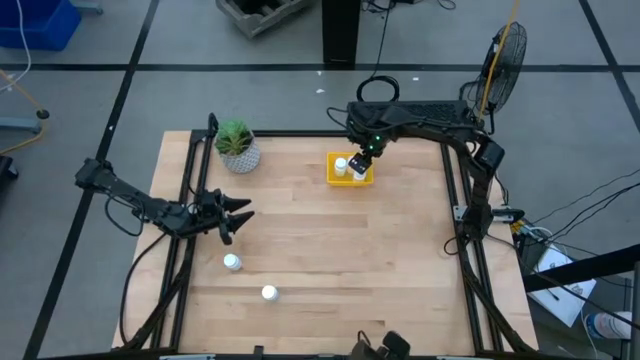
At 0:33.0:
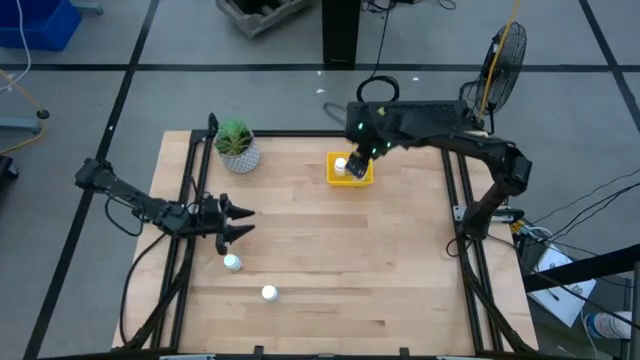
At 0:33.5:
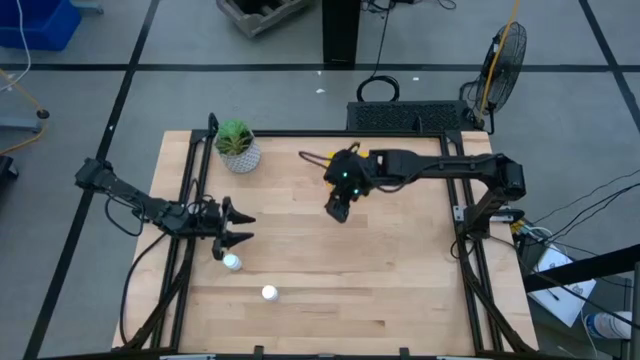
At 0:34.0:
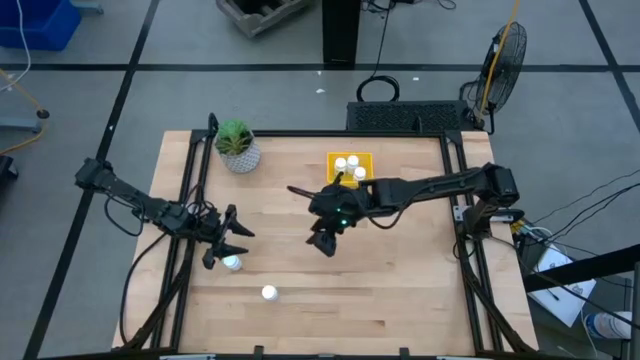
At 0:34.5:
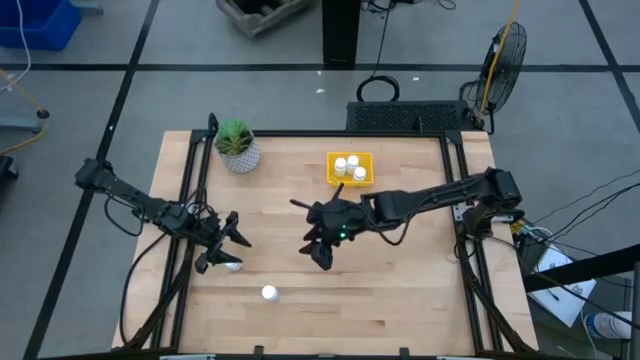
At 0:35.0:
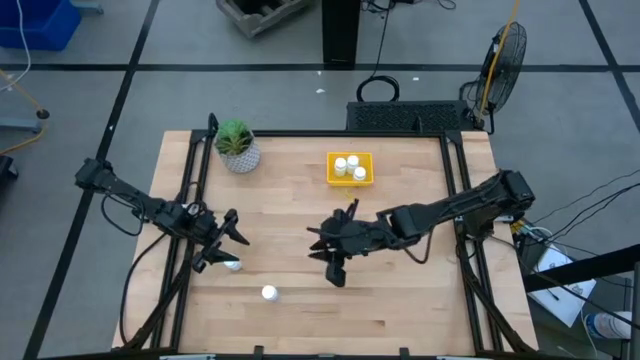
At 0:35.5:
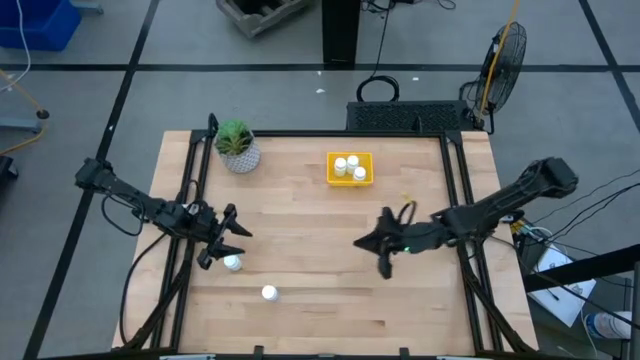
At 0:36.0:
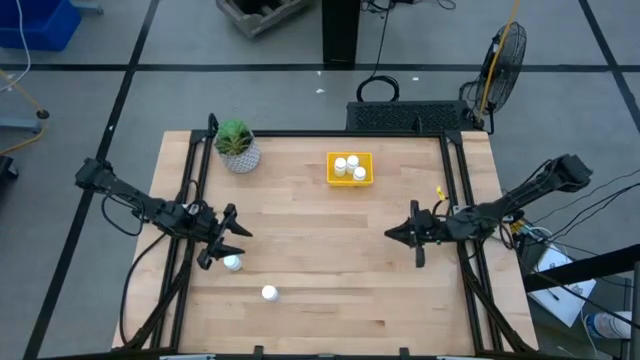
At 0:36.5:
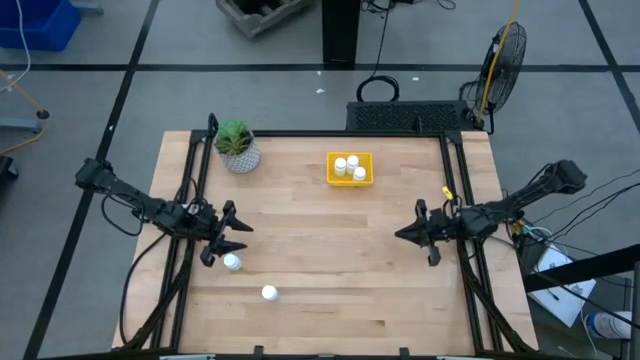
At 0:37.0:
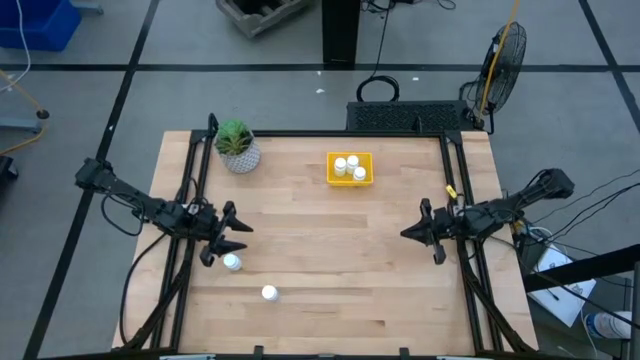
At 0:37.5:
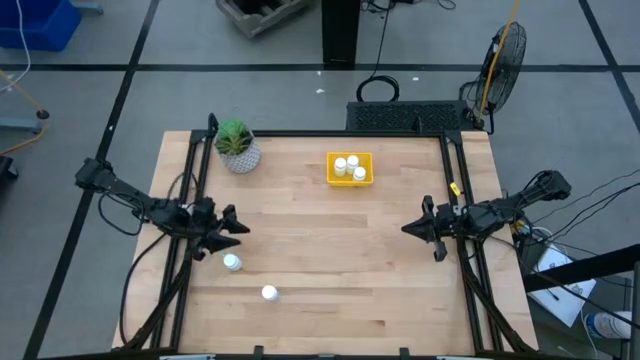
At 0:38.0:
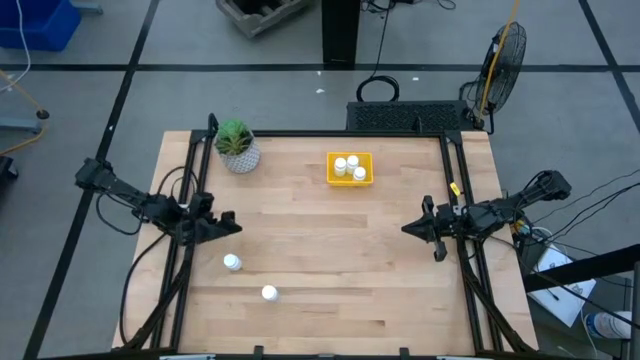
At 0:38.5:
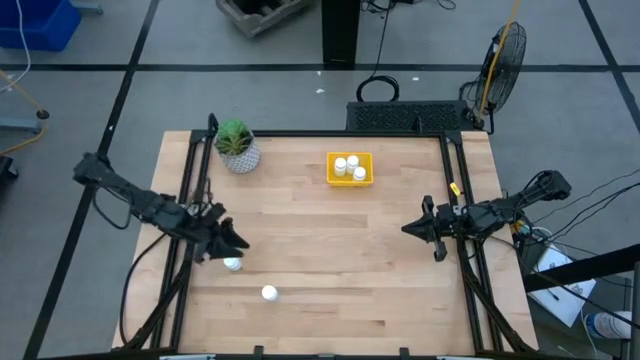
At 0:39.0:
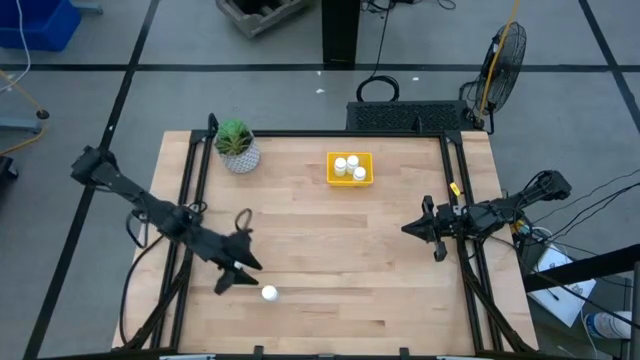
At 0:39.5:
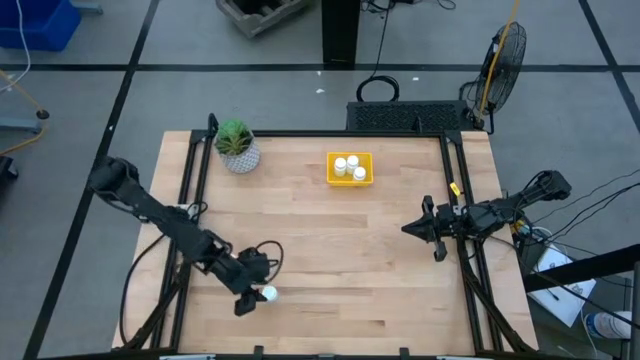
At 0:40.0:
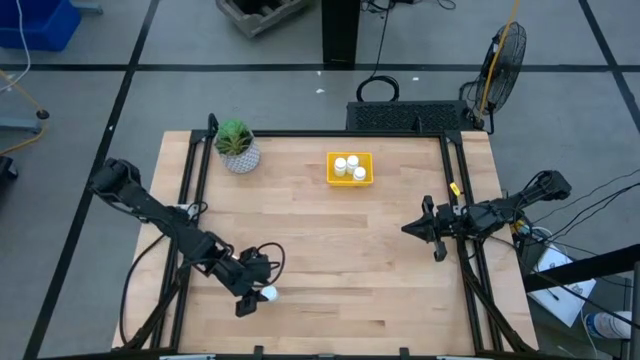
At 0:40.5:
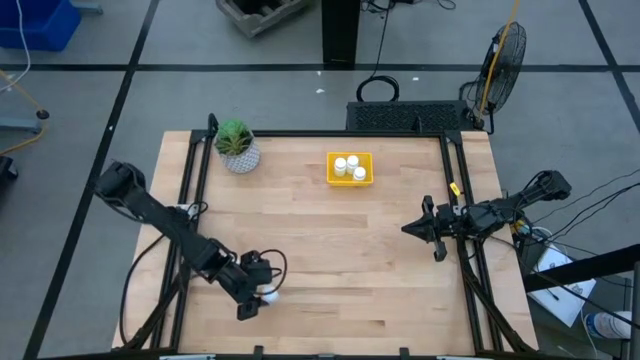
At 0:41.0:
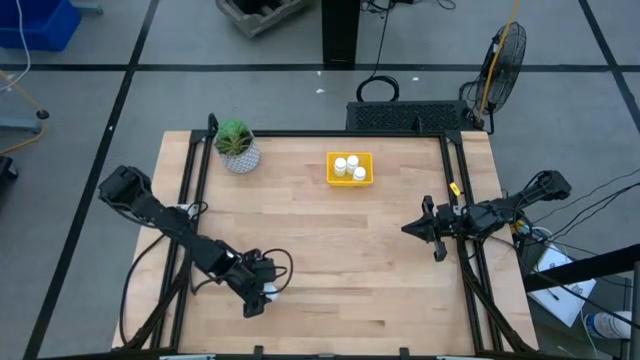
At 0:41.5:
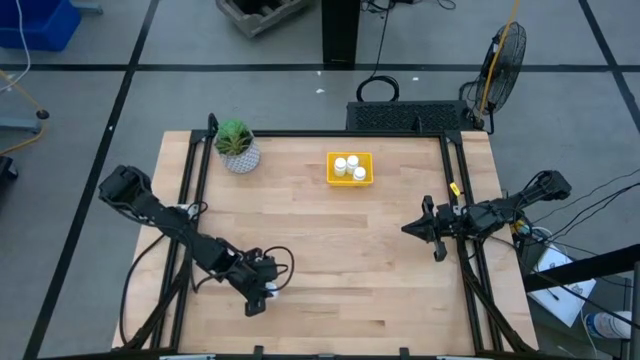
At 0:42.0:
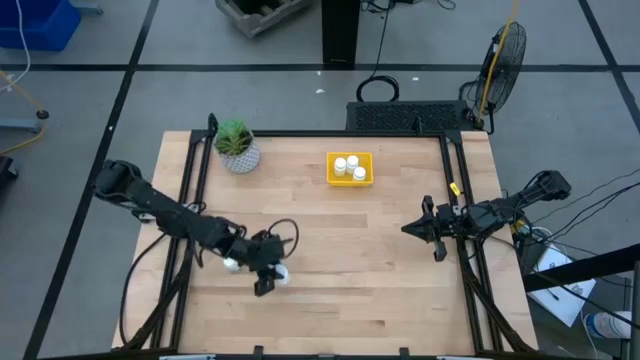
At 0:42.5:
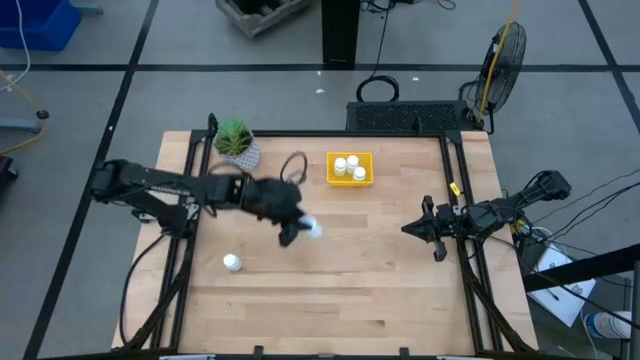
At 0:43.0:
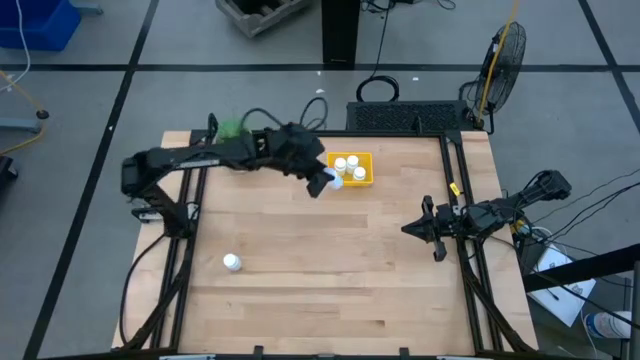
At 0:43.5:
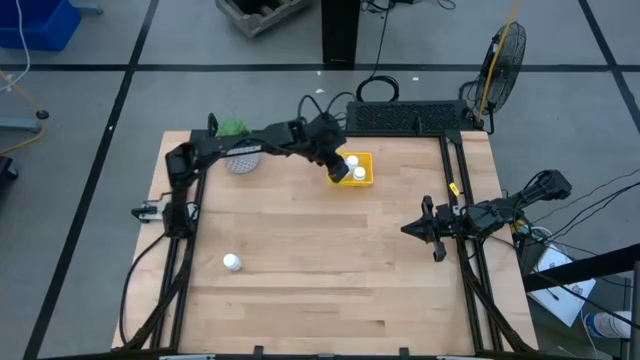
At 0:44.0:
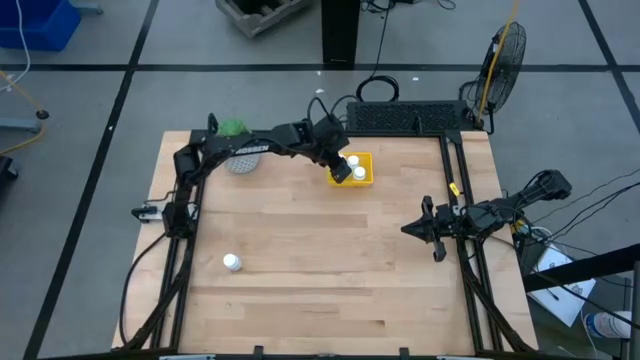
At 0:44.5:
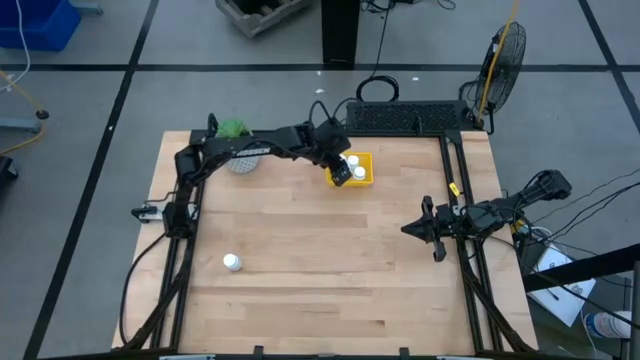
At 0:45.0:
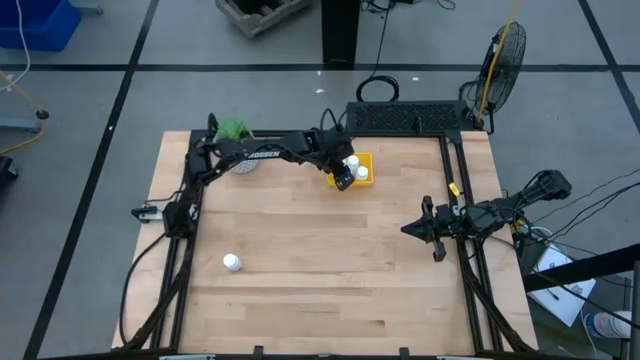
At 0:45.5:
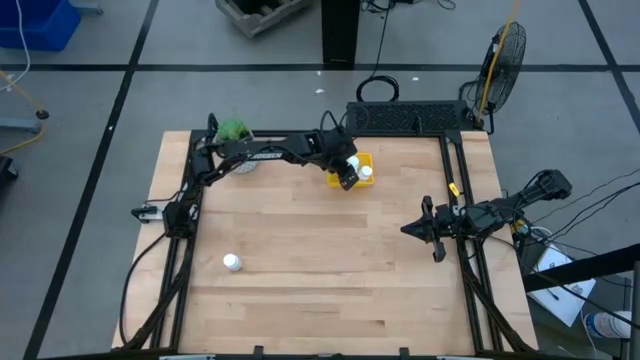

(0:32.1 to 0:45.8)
Task: Pick and place pill bottles into a basket
Put the white pill bottle into the yellow bin

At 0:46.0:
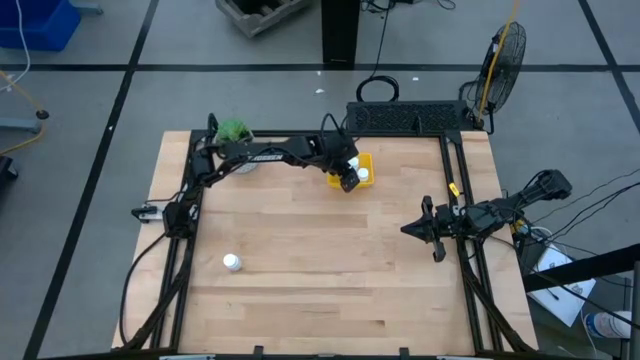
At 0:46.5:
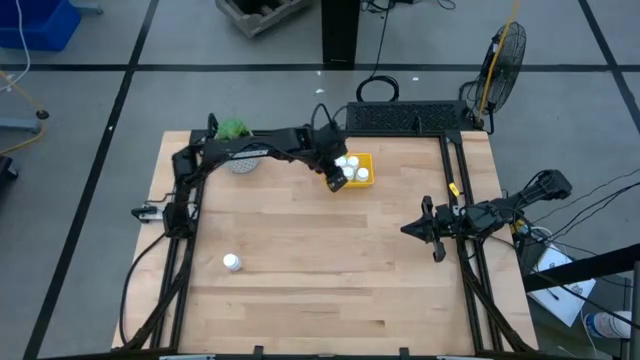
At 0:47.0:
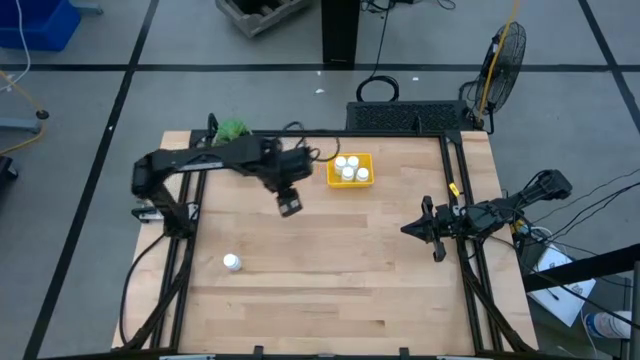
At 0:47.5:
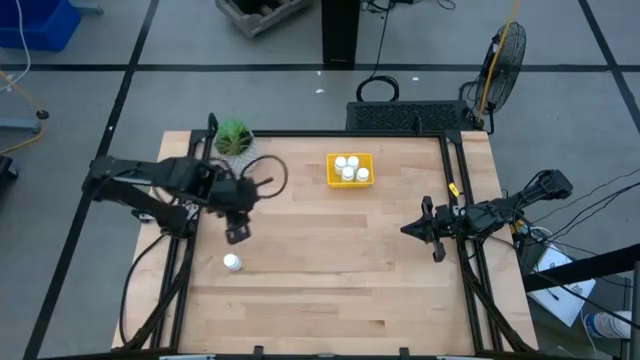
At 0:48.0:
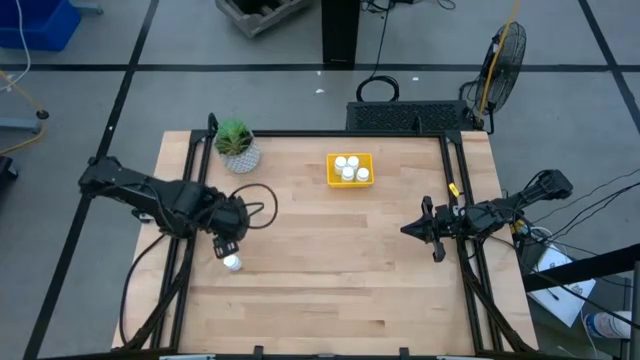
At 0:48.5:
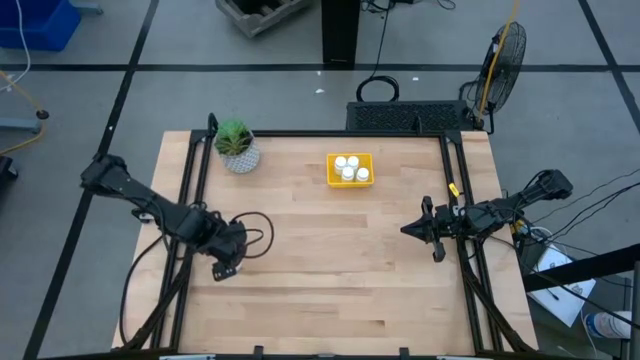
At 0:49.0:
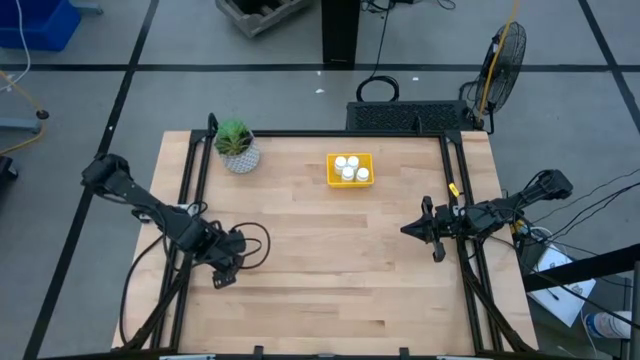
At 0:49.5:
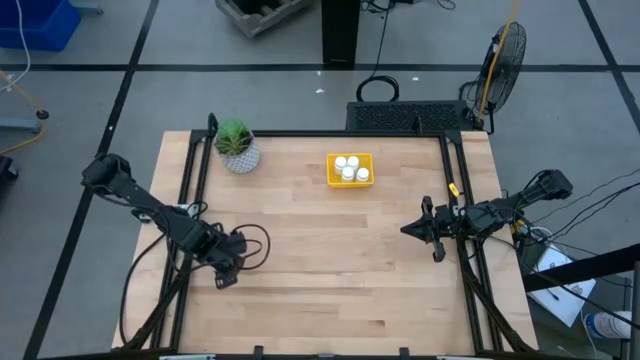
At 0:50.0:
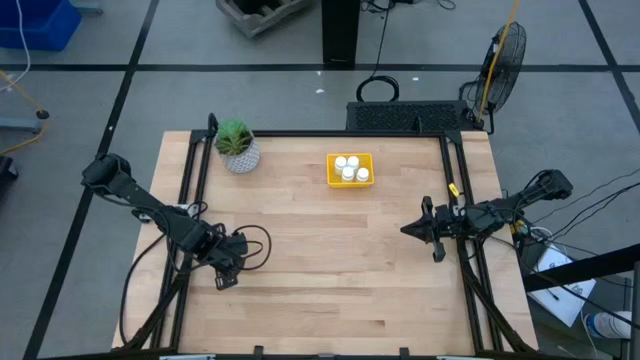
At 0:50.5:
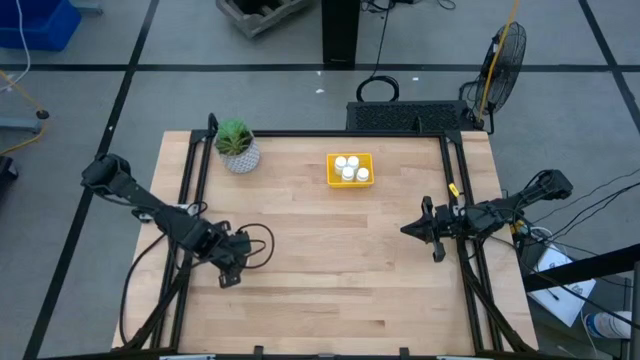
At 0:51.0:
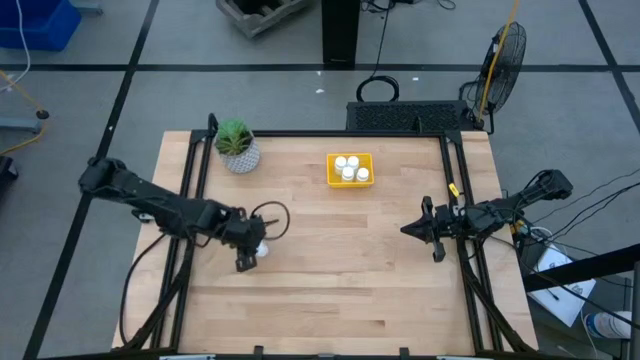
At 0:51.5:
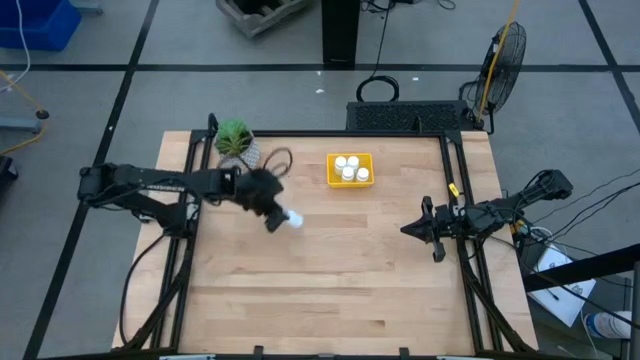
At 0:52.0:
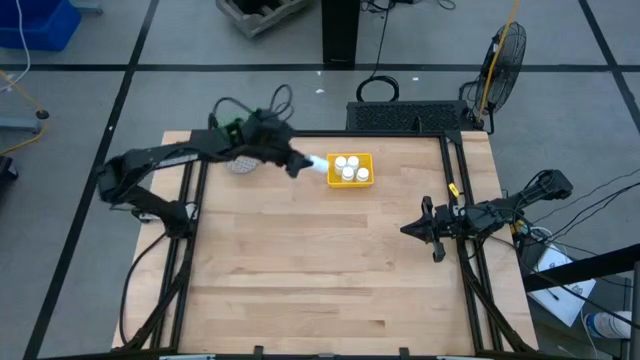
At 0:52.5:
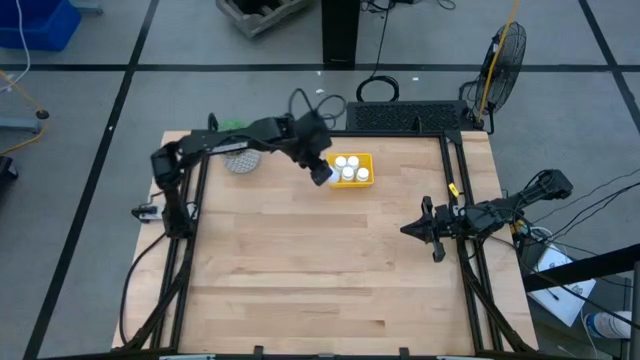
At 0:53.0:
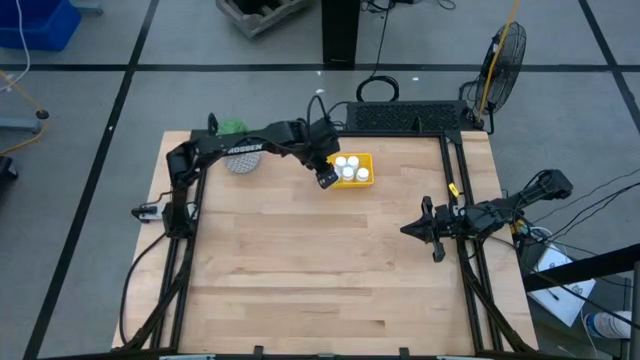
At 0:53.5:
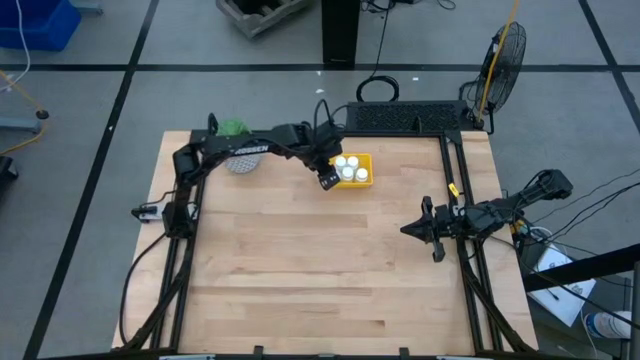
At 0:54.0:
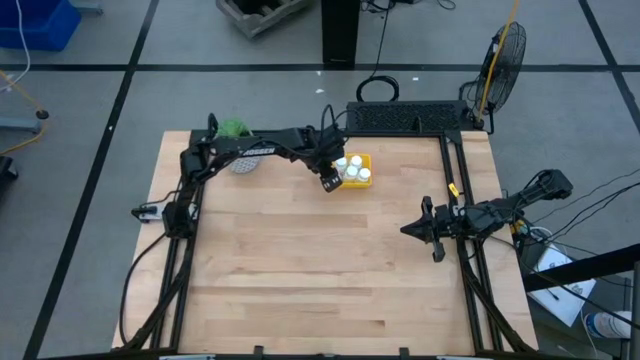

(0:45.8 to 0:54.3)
Put the white pill bottle into the yellow bin
